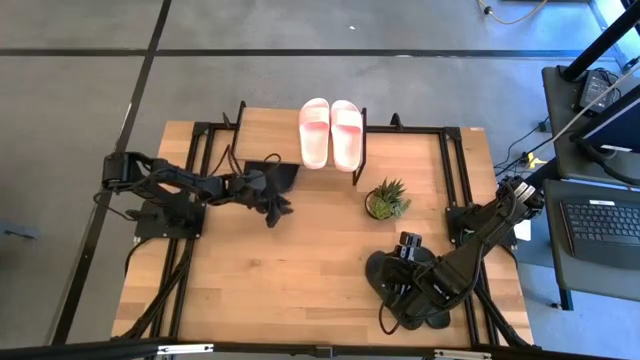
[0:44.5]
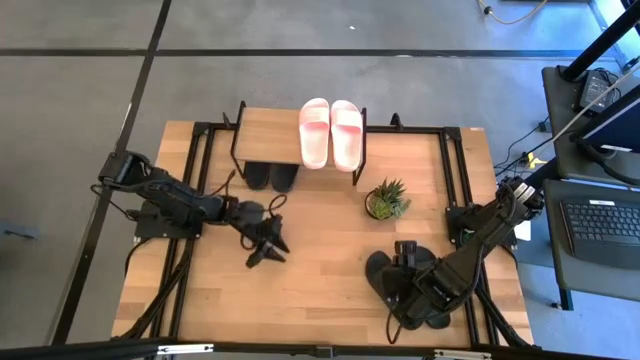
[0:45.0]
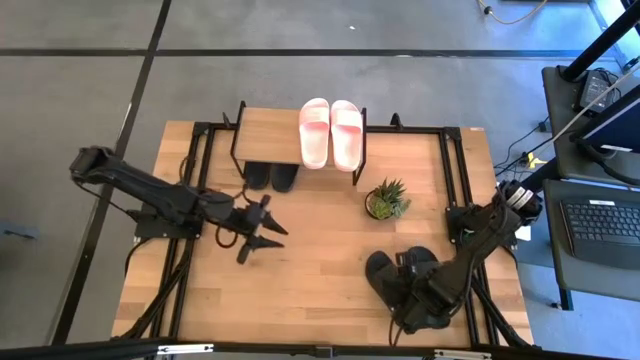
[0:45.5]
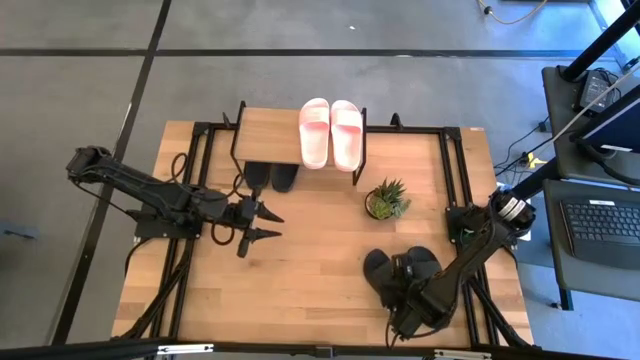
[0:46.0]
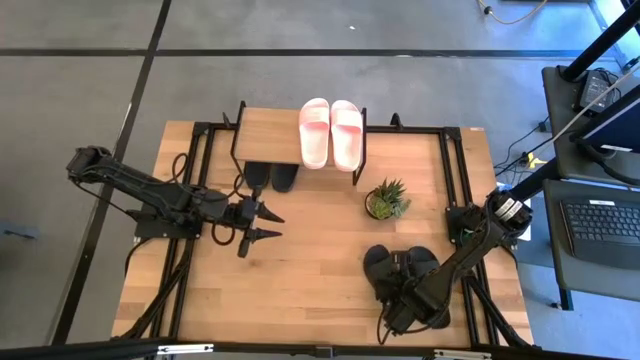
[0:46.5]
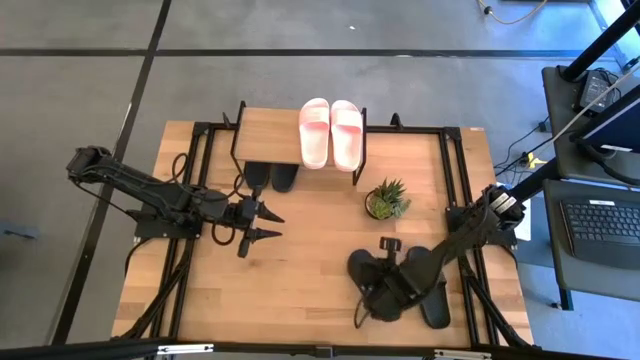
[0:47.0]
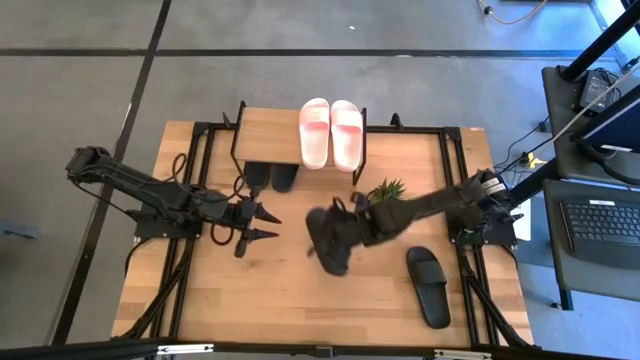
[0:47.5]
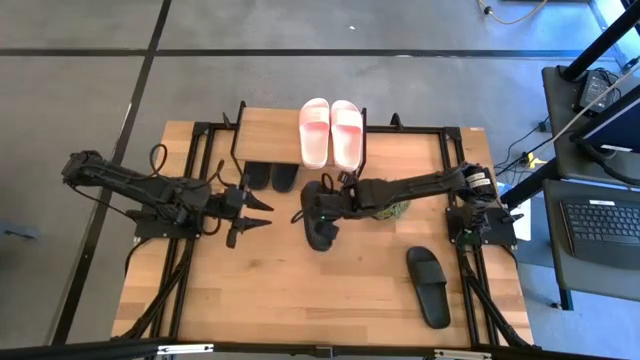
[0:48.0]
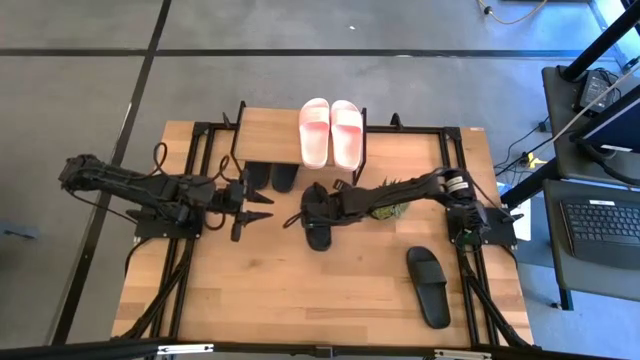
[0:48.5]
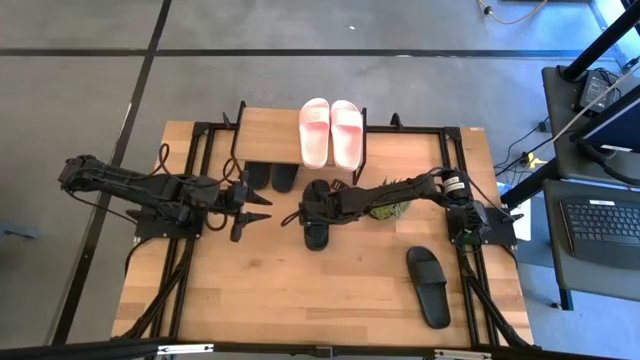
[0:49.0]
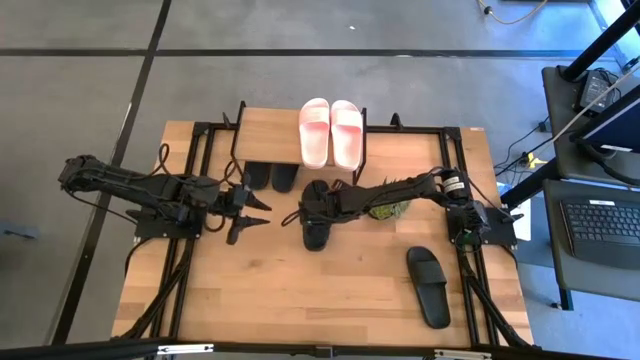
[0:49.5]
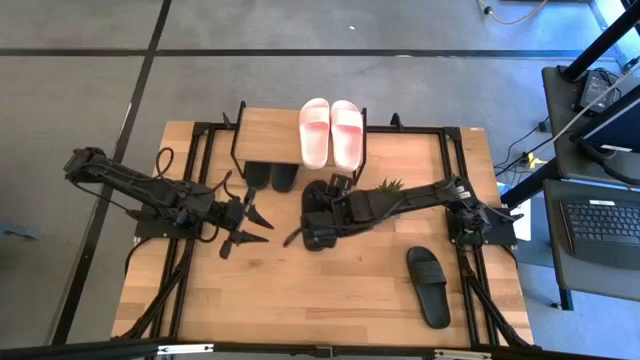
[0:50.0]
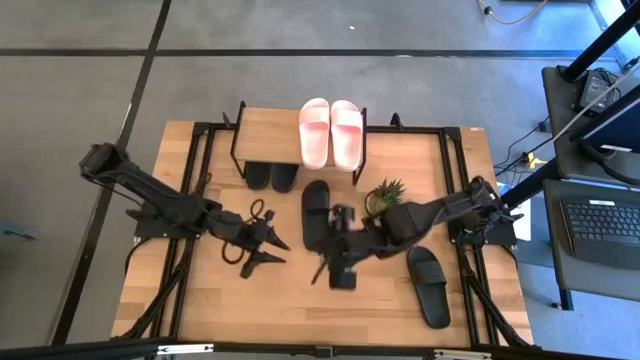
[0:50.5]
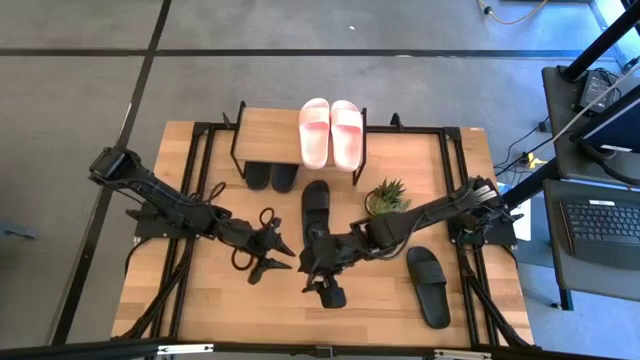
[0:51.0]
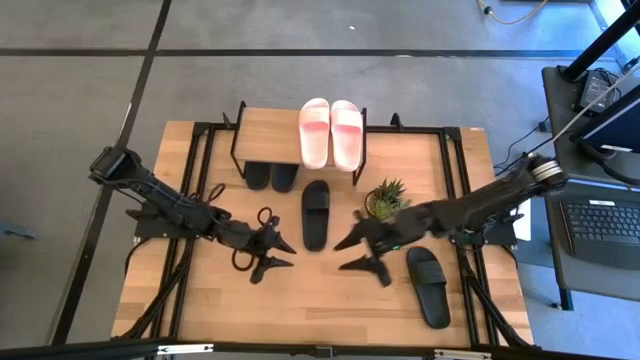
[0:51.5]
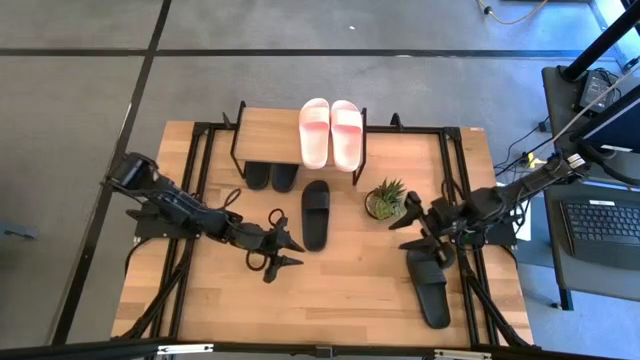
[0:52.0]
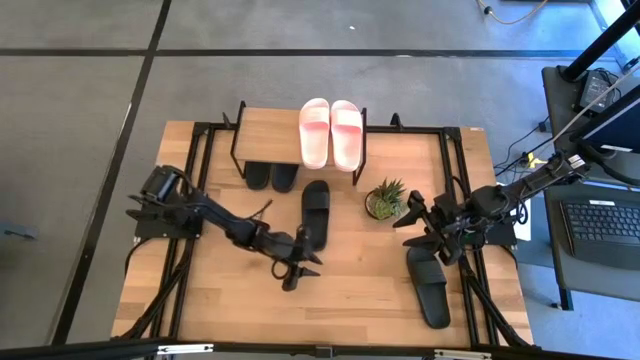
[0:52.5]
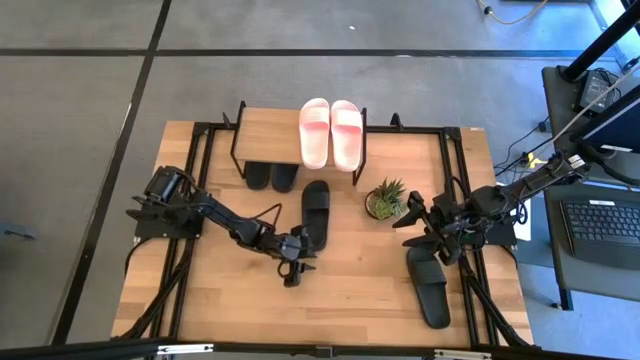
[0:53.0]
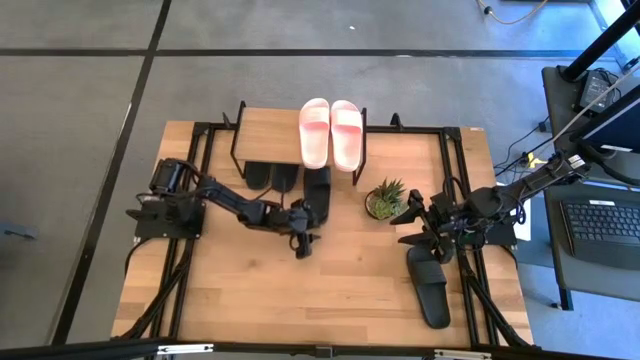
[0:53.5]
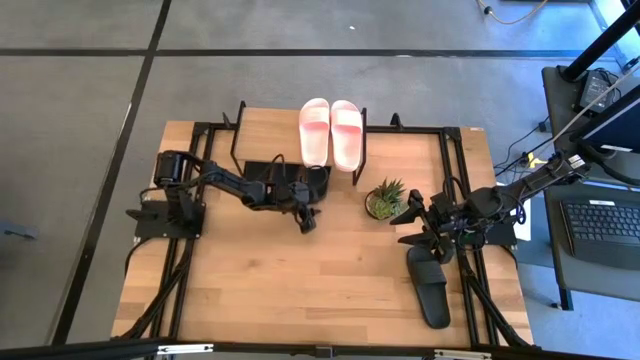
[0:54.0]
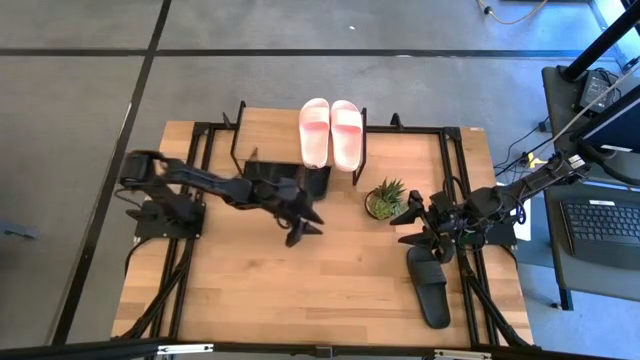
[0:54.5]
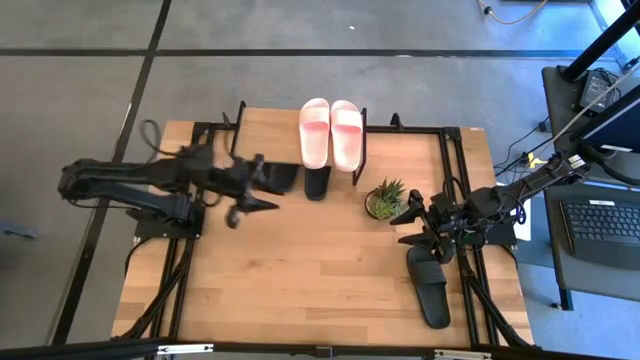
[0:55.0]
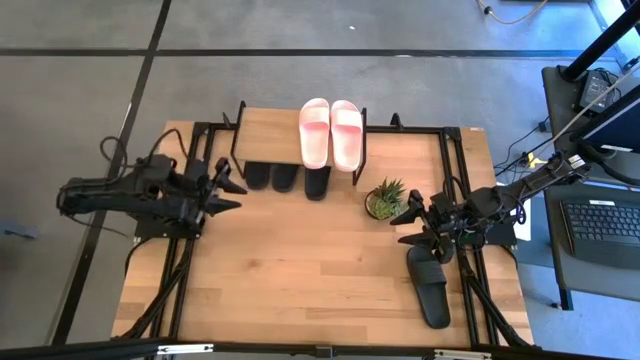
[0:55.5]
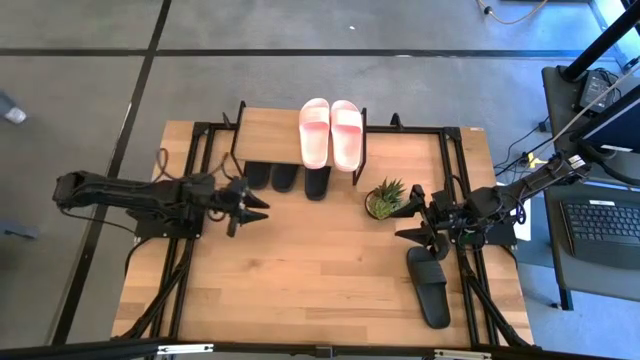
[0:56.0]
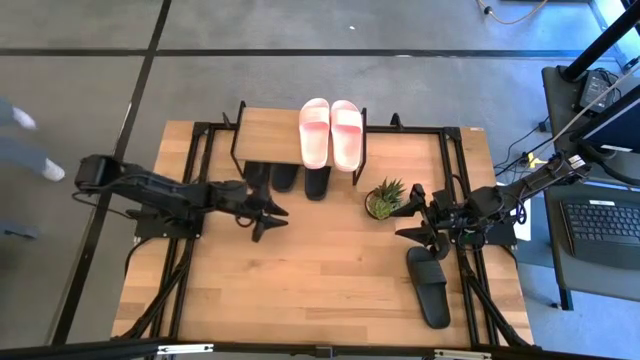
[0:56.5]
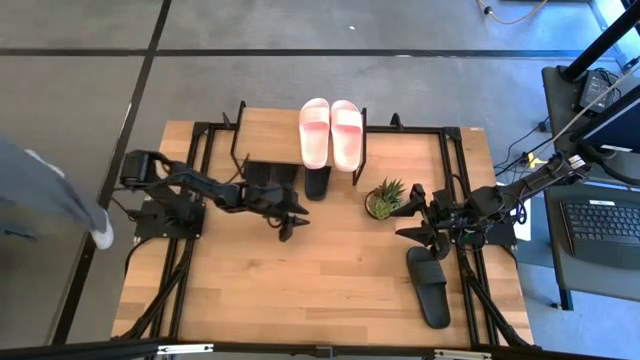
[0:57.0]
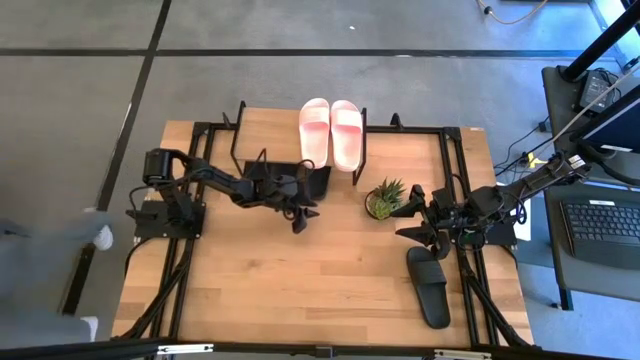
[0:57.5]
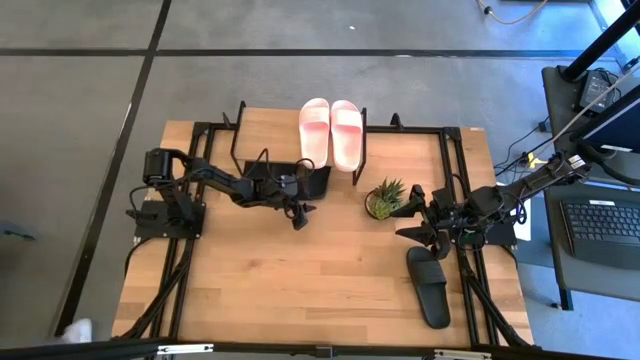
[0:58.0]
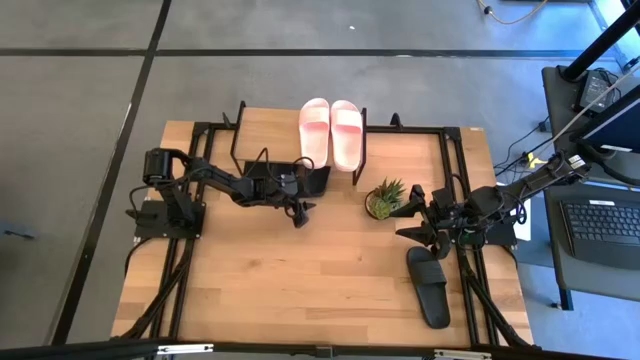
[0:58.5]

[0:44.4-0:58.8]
Task: Pick and place slides into the shelf
Put the black slide under the shelf

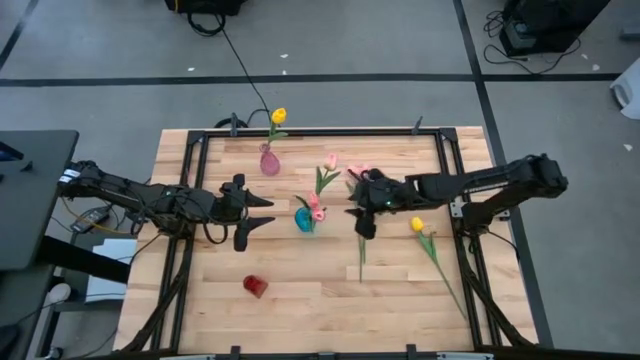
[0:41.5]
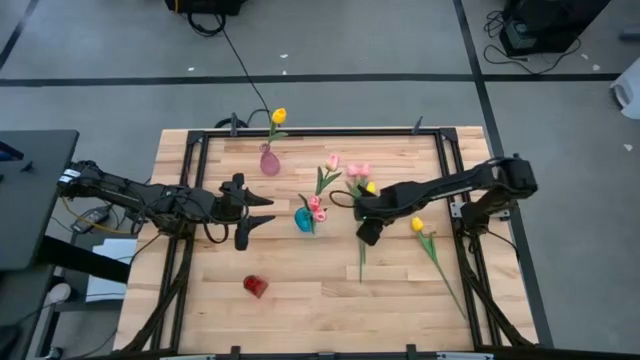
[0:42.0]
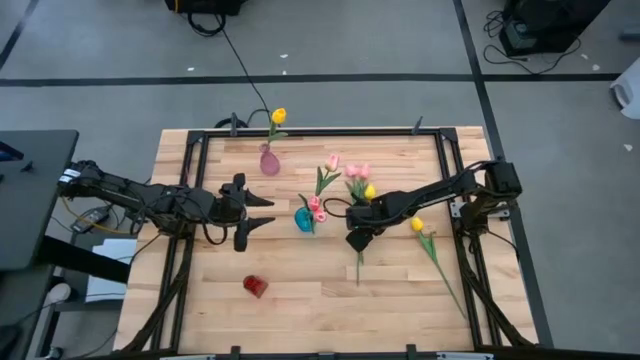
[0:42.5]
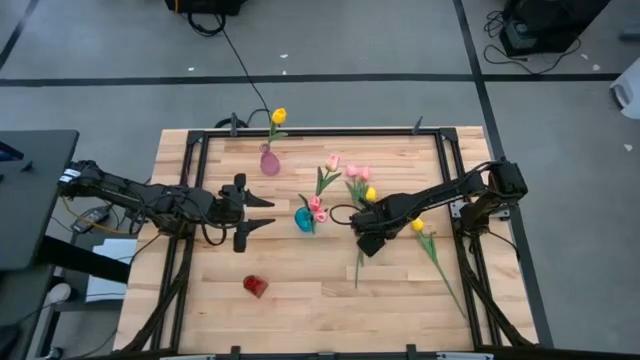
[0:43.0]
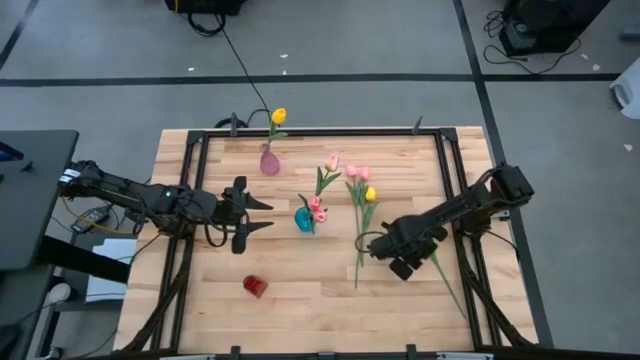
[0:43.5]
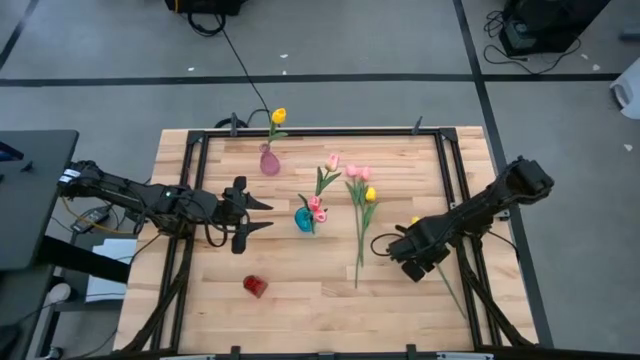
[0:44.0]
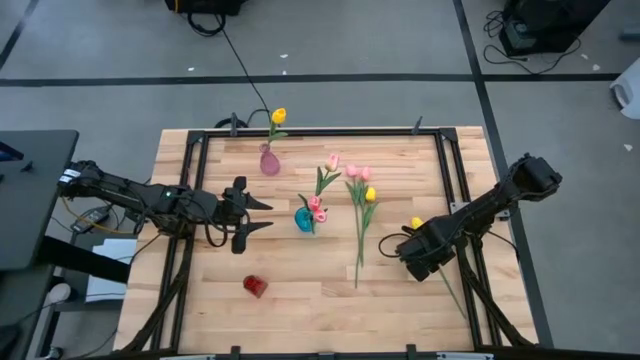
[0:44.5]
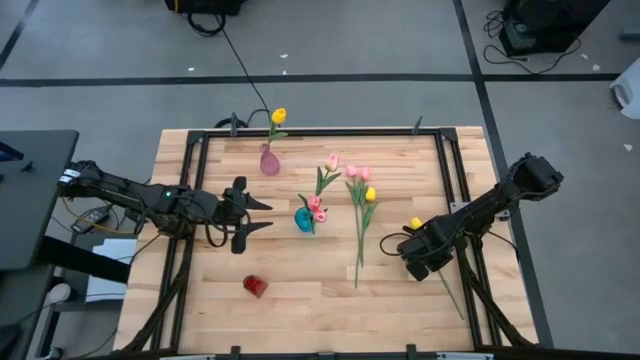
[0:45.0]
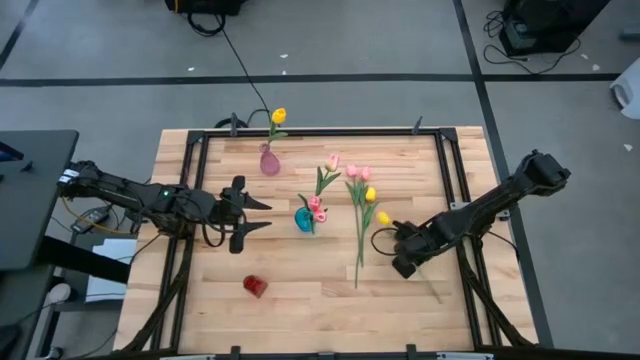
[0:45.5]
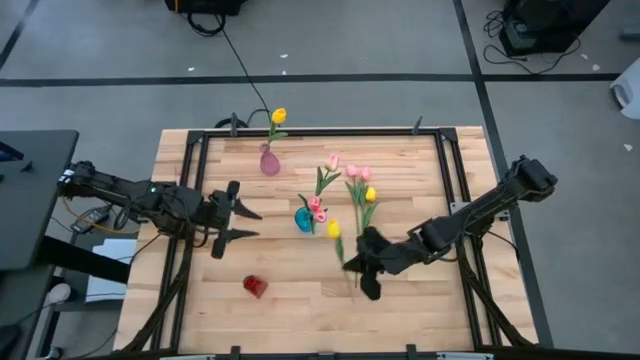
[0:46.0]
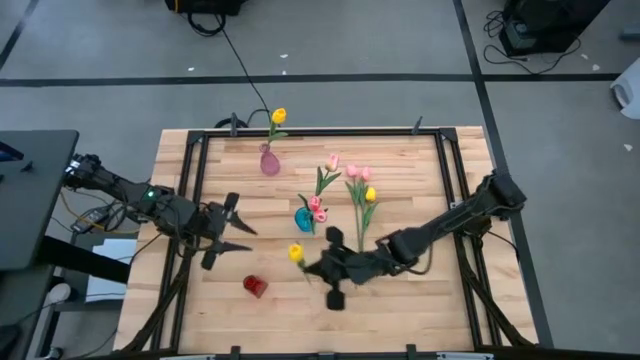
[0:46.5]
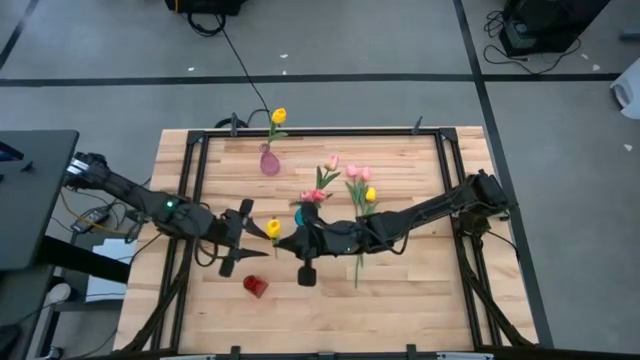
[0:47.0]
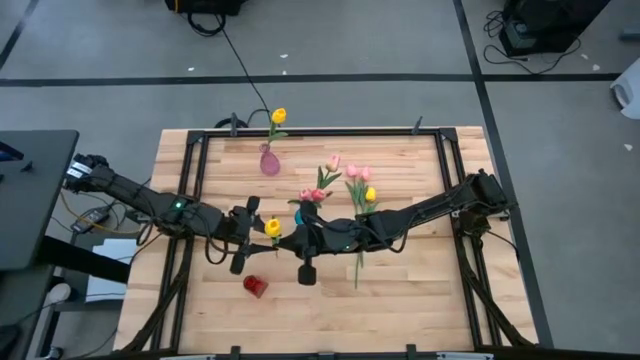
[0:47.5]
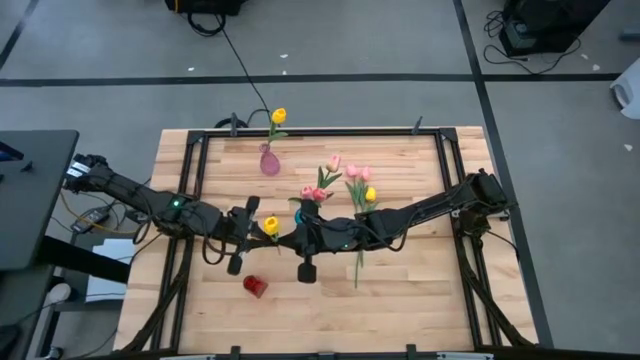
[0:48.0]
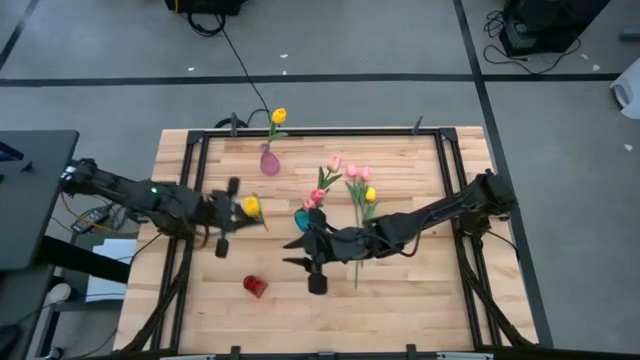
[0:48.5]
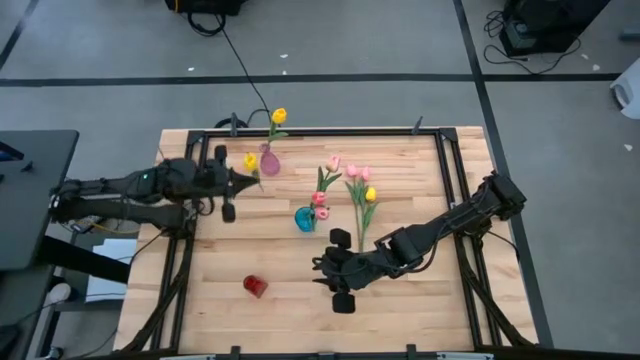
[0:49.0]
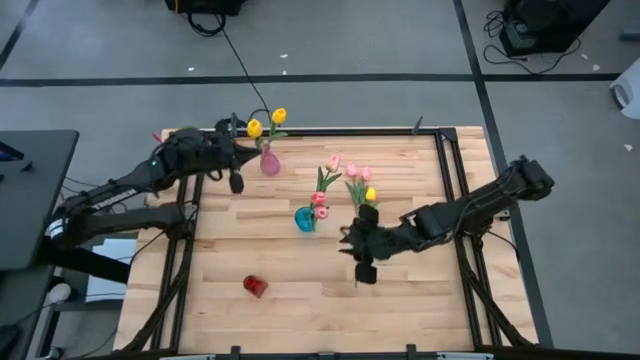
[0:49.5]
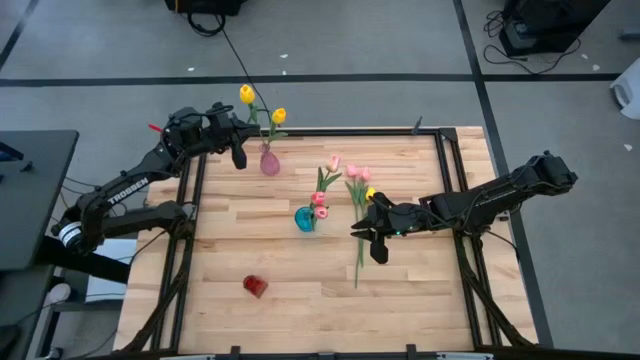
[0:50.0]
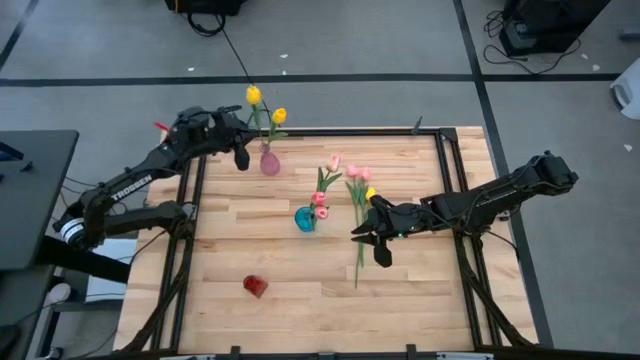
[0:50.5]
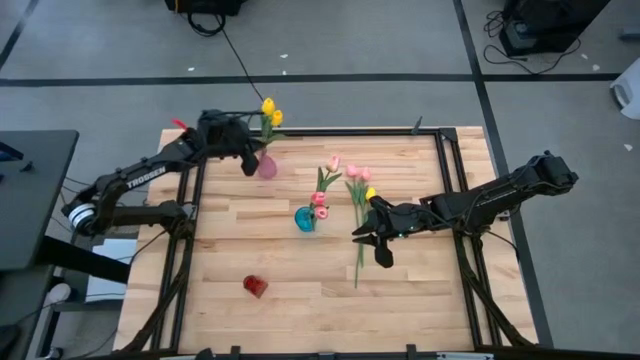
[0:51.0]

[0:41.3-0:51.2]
Task: Sort flowers into vase by color
Put the yellow flower into the purple flower vase
